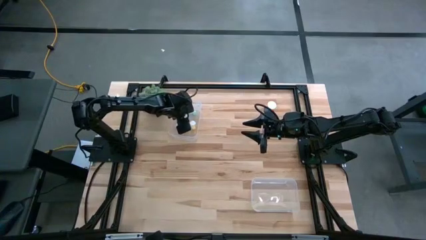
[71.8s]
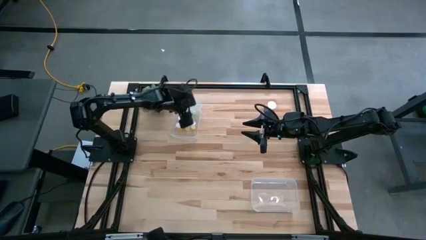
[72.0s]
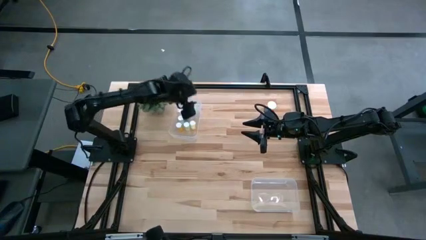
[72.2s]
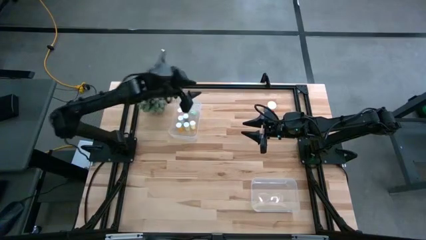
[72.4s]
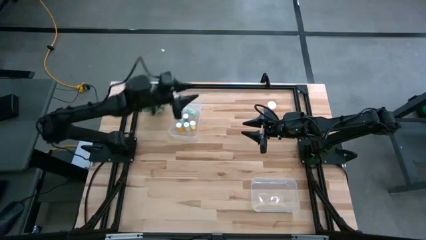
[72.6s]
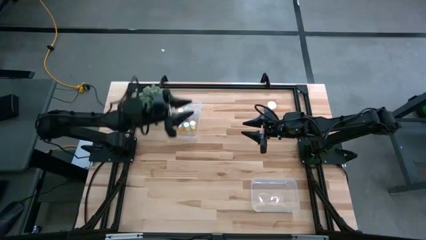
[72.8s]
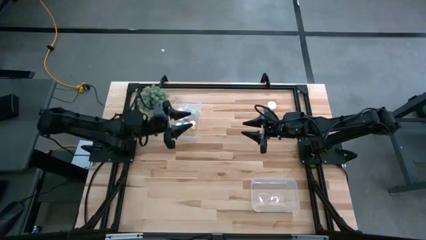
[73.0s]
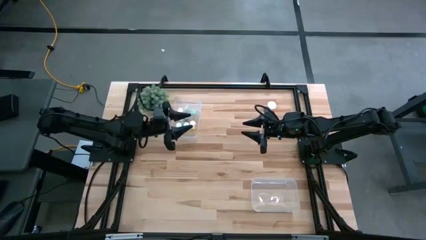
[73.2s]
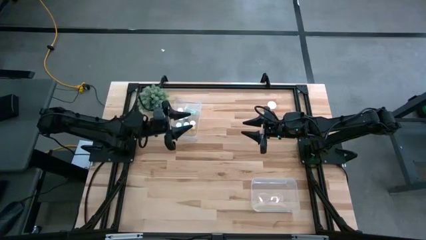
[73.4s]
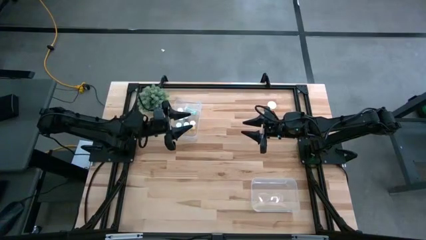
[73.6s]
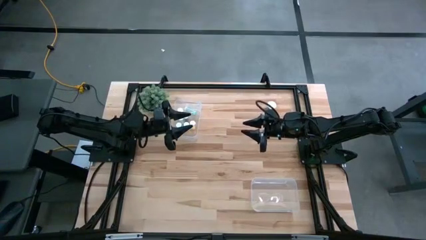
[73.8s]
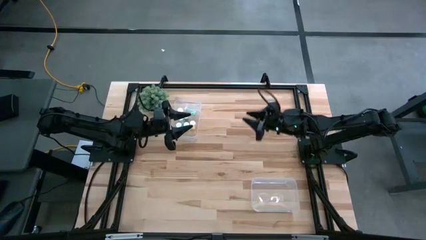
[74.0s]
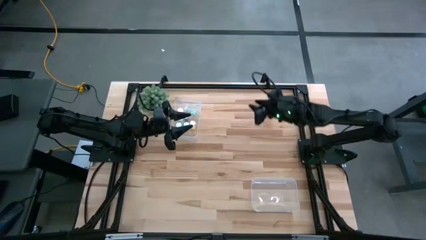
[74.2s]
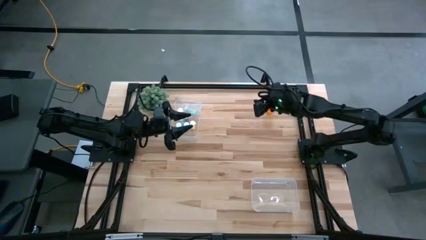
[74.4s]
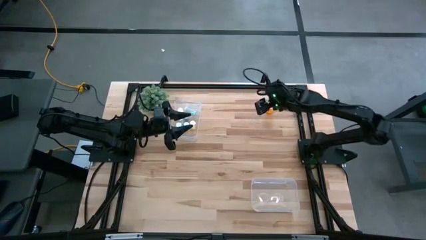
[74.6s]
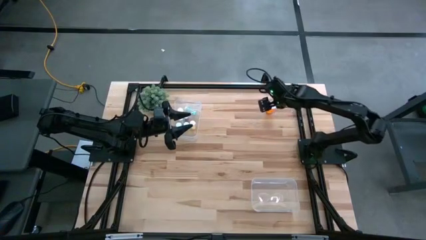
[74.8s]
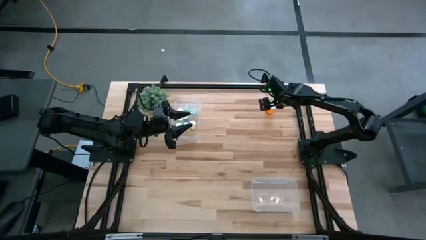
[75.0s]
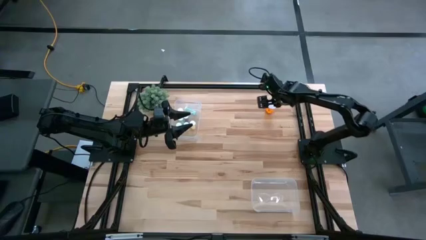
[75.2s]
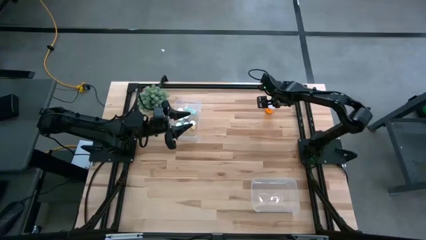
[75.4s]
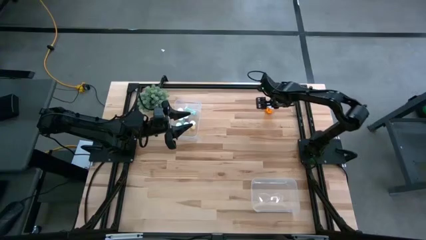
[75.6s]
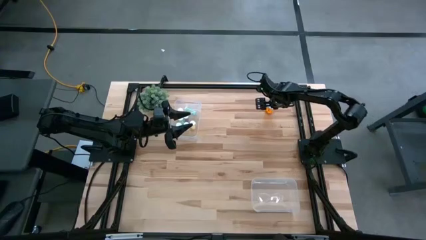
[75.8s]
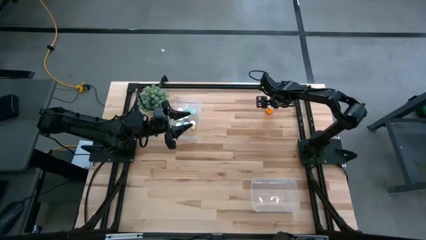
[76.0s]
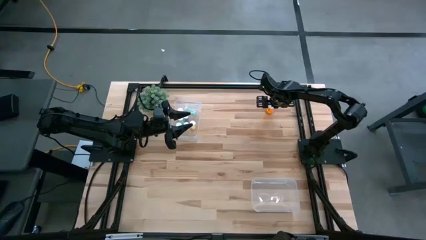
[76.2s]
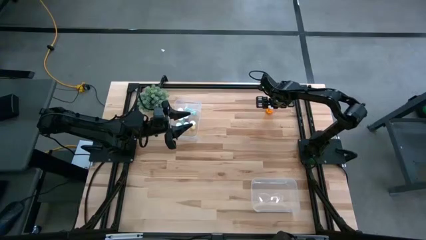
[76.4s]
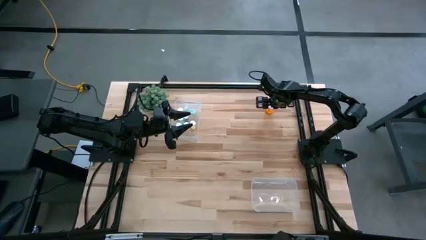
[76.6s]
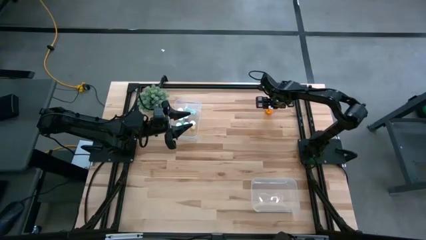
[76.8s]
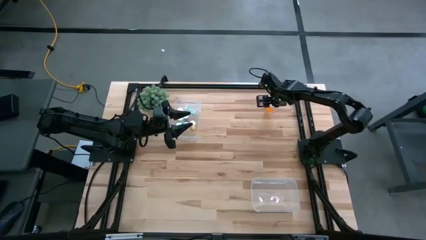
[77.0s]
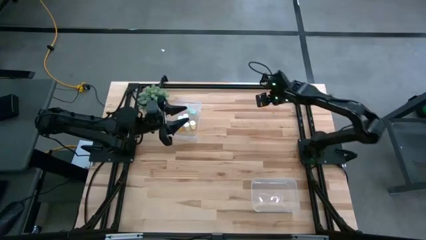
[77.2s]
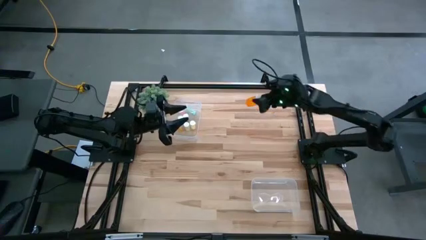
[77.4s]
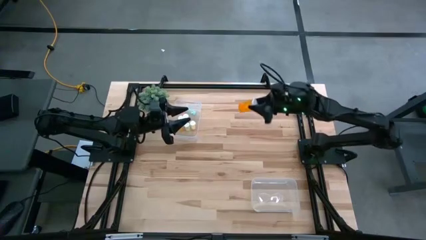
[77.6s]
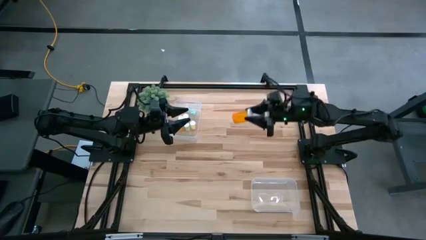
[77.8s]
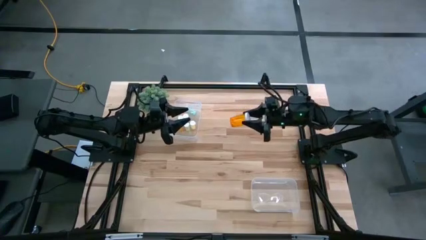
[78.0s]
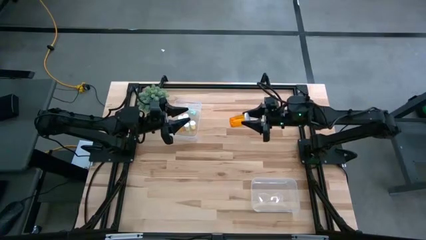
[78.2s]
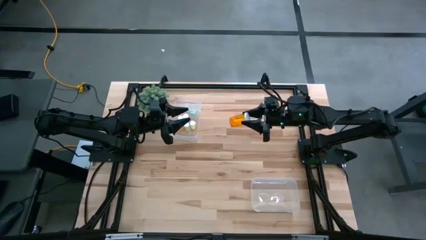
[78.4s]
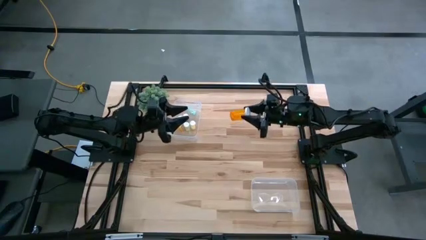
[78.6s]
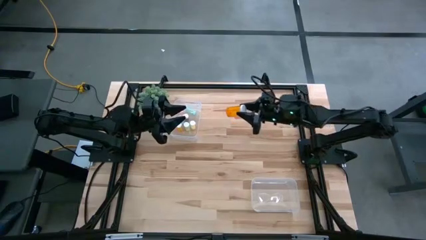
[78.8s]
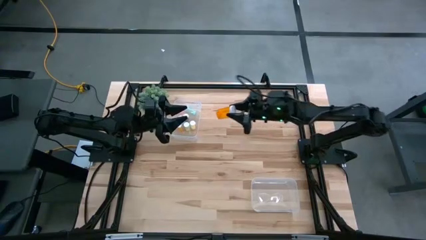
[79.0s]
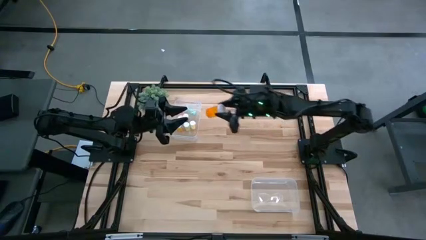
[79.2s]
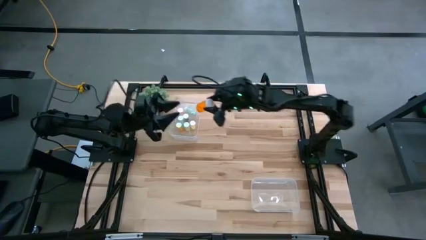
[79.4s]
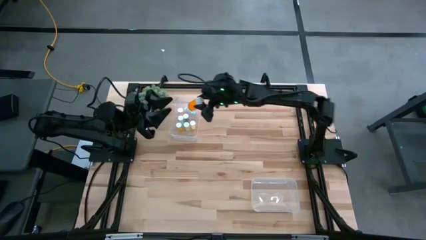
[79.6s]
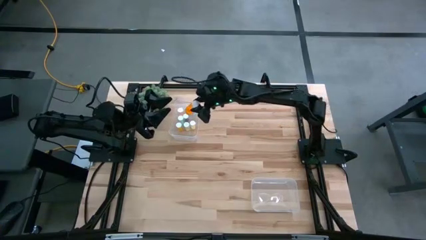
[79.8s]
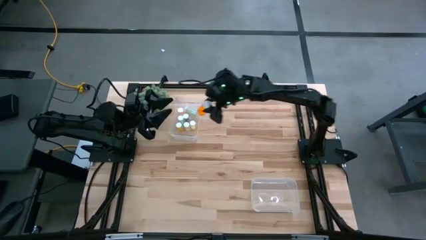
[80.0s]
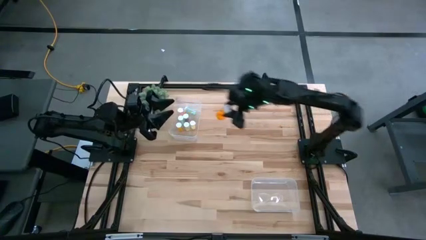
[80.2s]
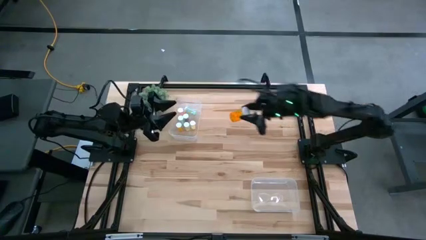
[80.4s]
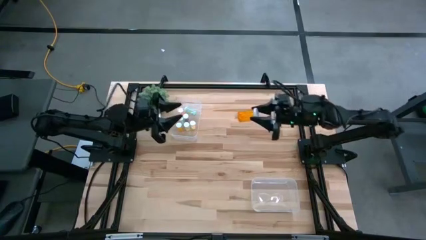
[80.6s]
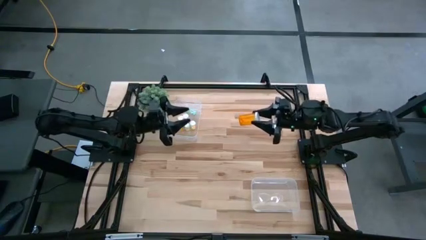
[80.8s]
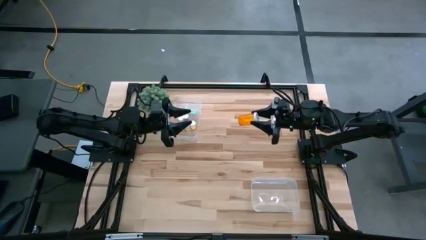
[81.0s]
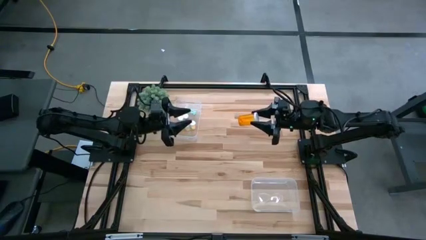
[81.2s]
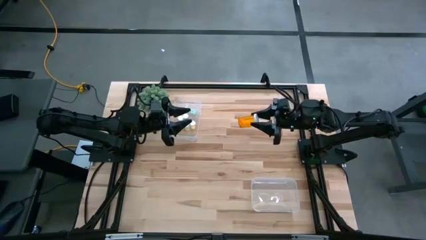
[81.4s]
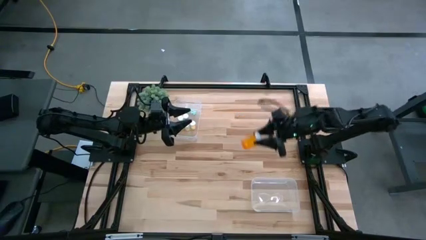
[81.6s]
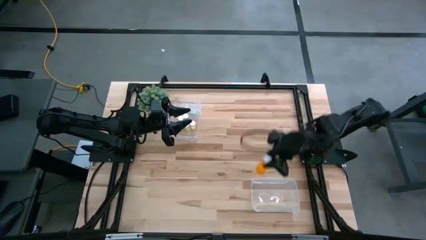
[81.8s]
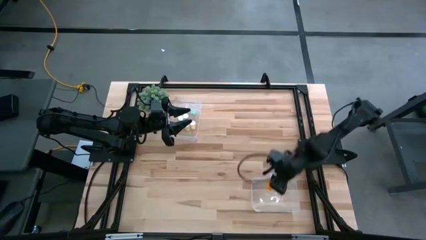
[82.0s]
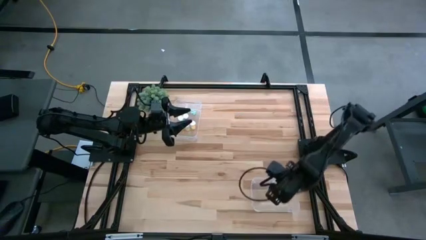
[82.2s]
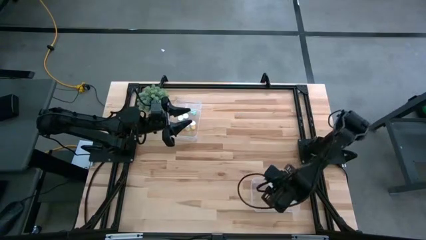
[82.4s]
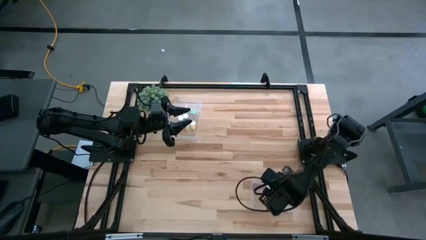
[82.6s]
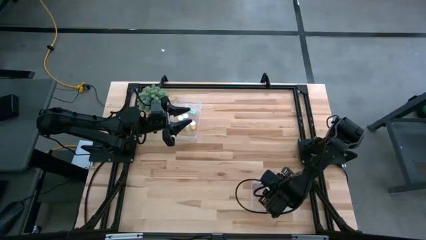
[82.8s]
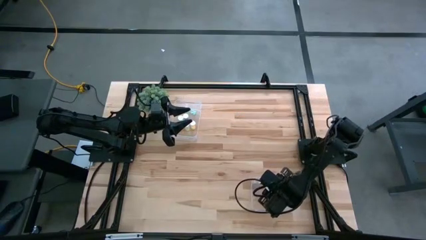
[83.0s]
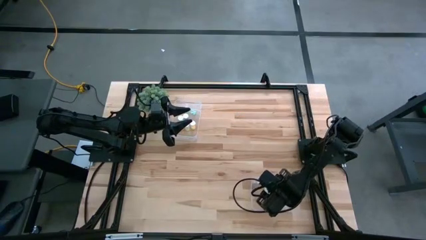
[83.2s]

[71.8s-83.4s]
Task: Pick and place medicine bottles into bin by pill shape (circle, oval)
Put the large orange capsule bottle into the bottom transparent bin

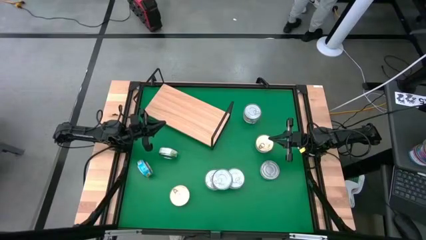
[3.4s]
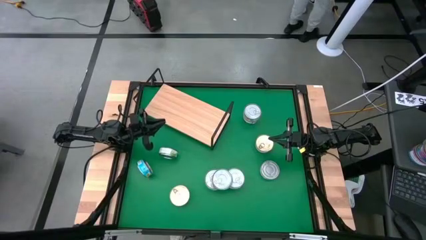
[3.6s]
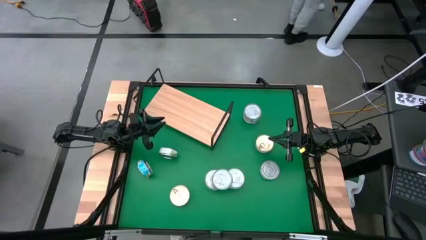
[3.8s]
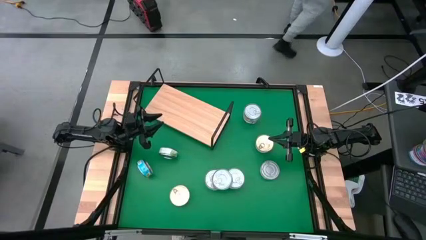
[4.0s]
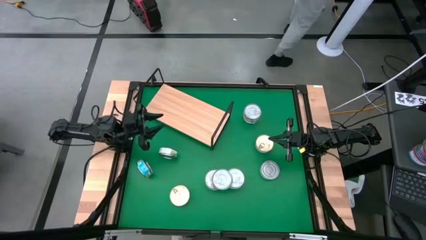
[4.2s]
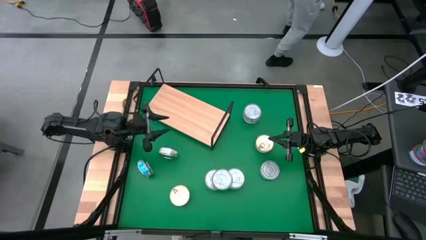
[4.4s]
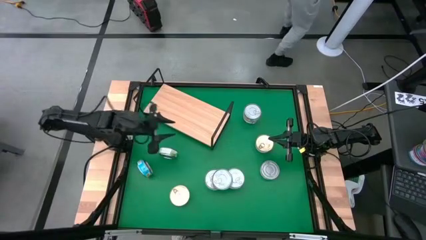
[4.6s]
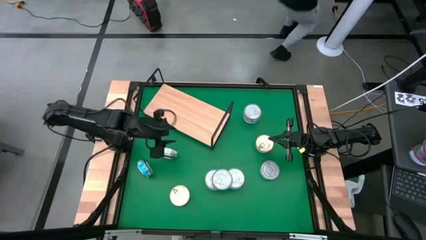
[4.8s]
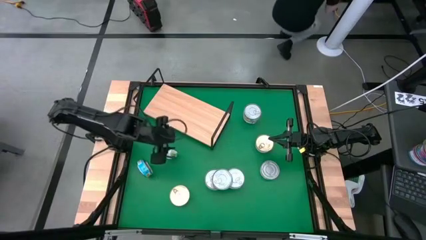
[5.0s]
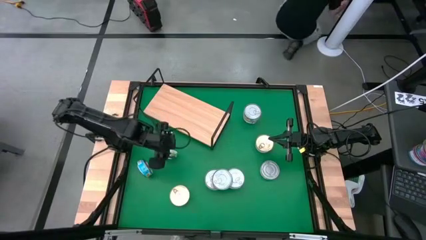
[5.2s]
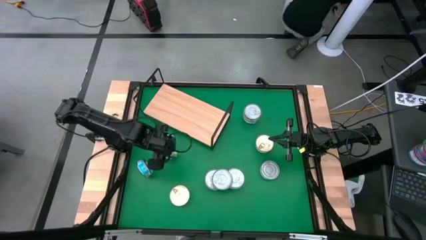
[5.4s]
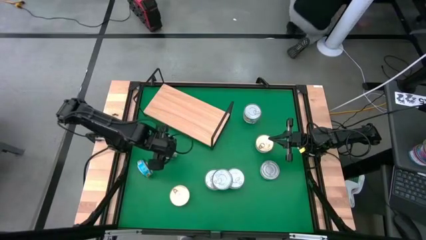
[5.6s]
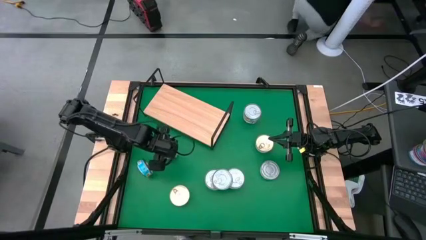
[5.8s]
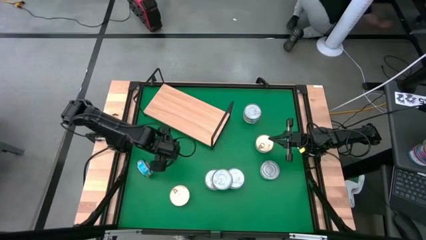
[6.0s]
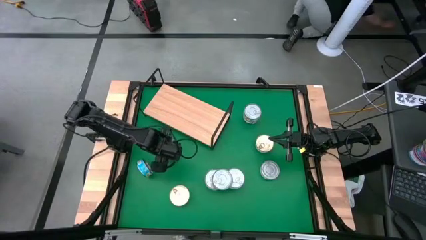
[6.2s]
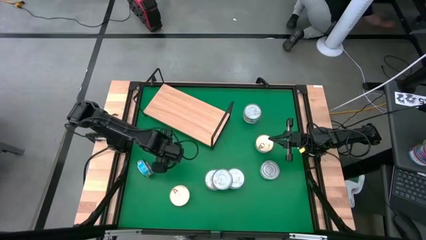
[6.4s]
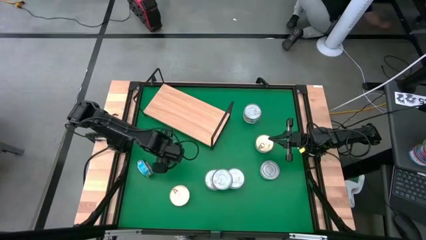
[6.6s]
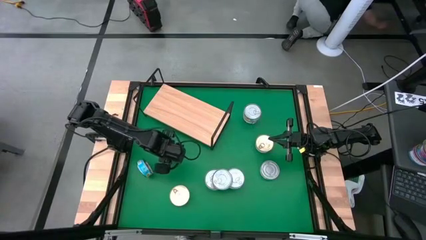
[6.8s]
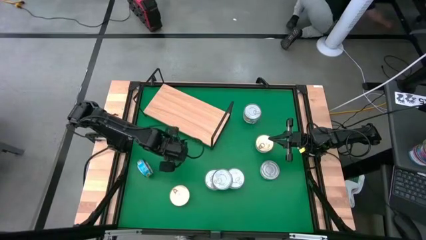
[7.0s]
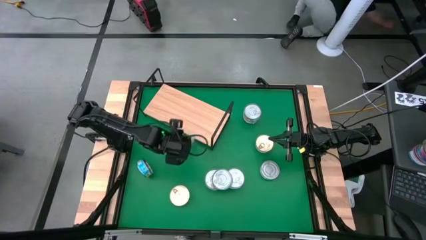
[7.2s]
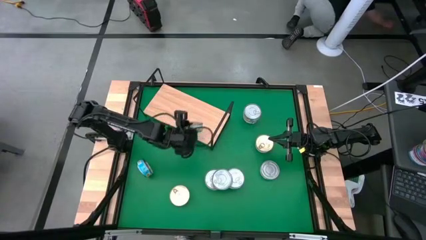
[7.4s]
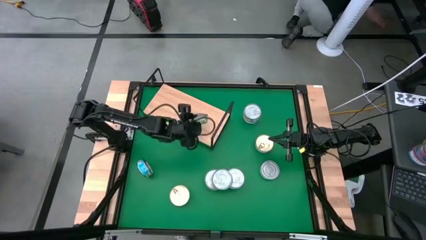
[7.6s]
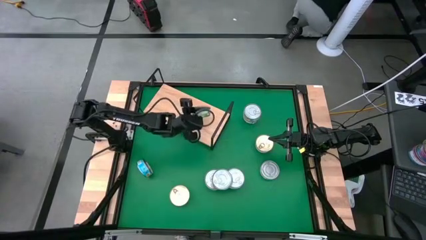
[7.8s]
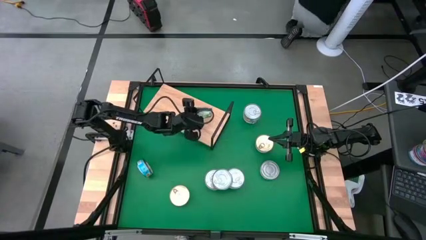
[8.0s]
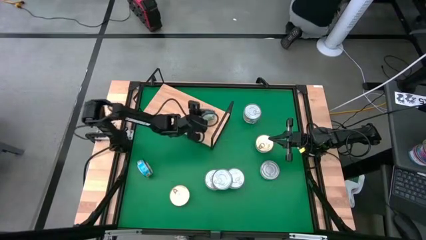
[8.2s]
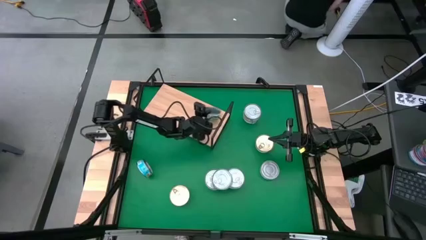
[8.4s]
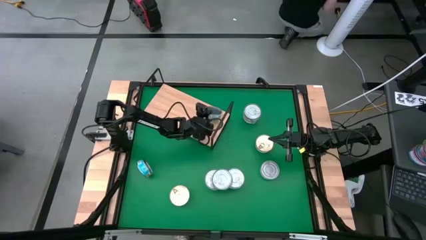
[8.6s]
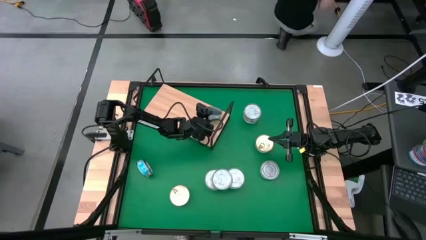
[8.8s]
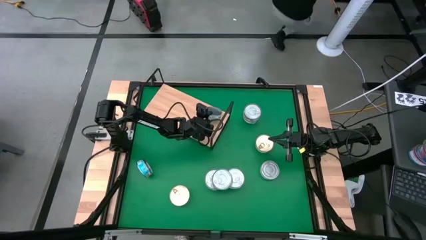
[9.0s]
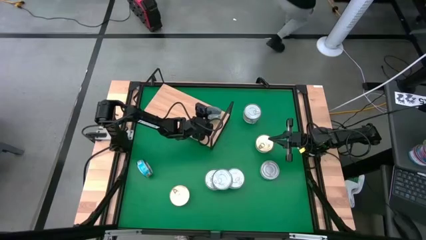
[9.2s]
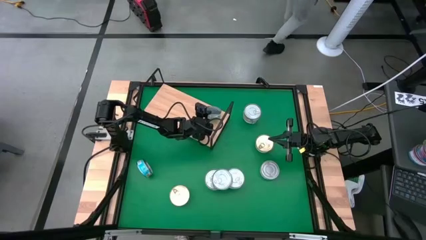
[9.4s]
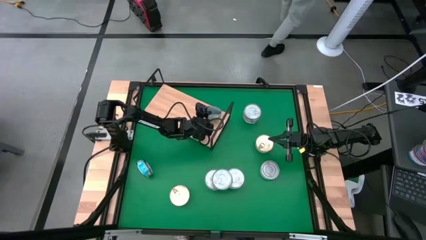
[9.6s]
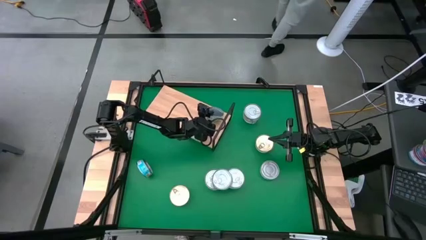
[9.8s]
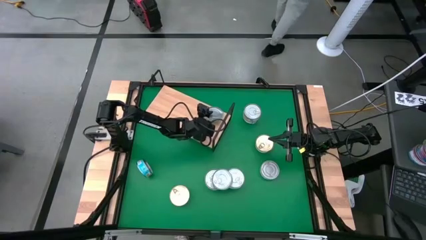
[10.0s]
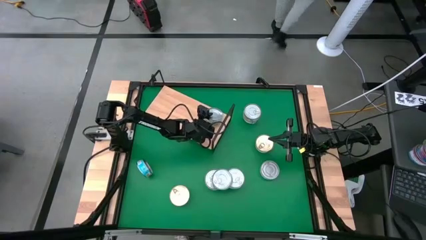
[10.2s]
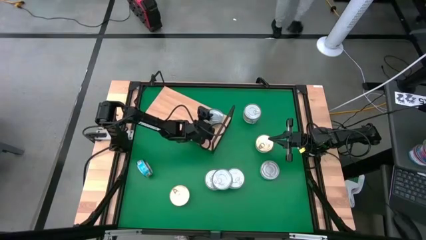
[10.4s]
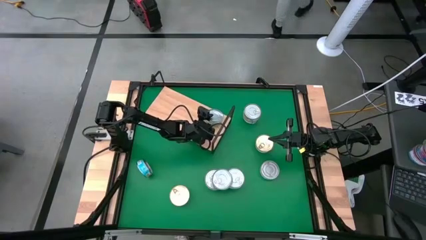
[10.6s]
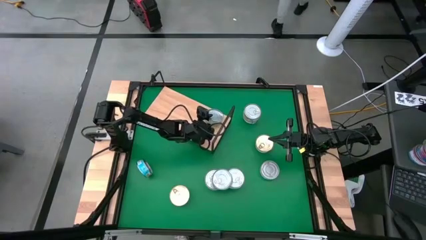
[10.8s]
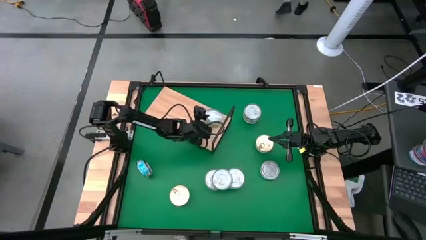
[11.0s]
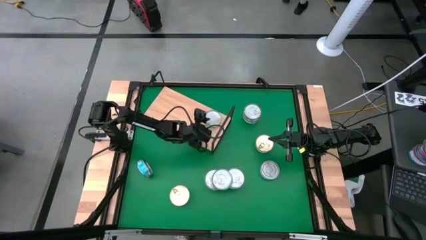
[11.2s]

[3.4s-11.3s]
Task: Stack canned seafood by type on shelf
Put the green tuna can on the shelf
